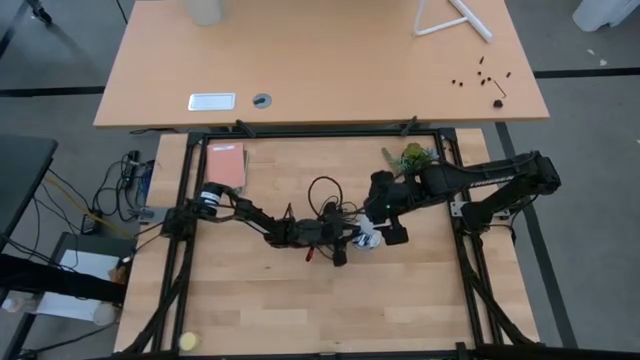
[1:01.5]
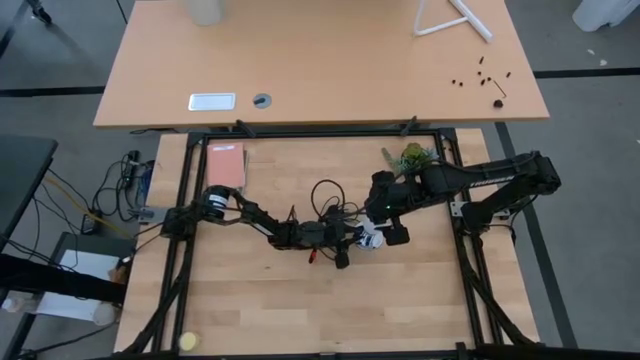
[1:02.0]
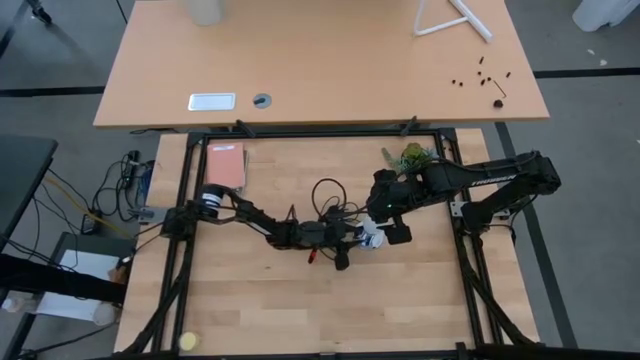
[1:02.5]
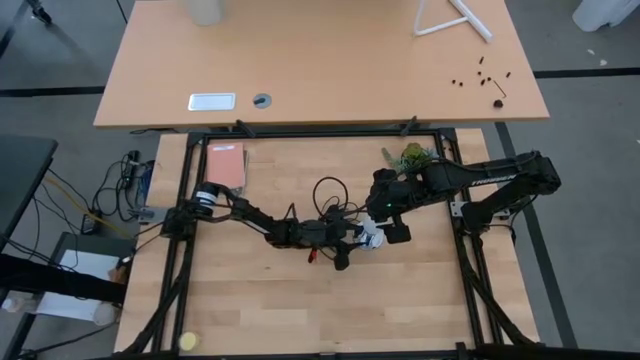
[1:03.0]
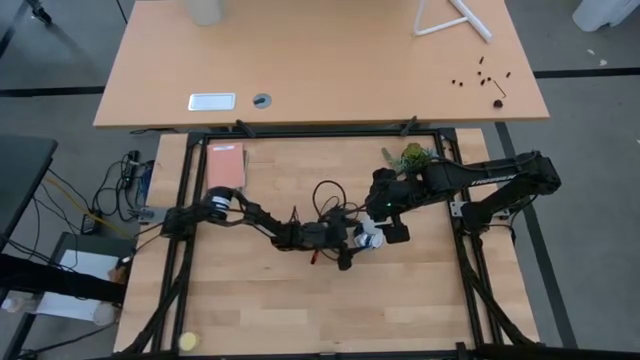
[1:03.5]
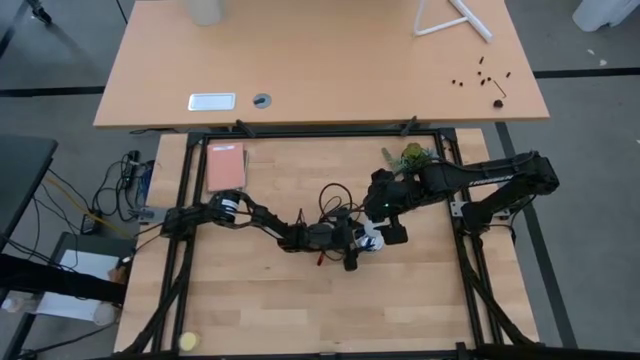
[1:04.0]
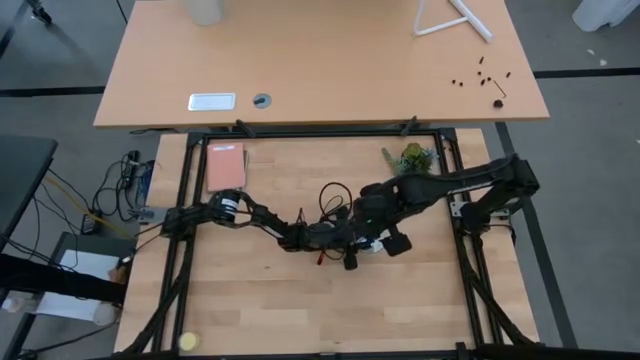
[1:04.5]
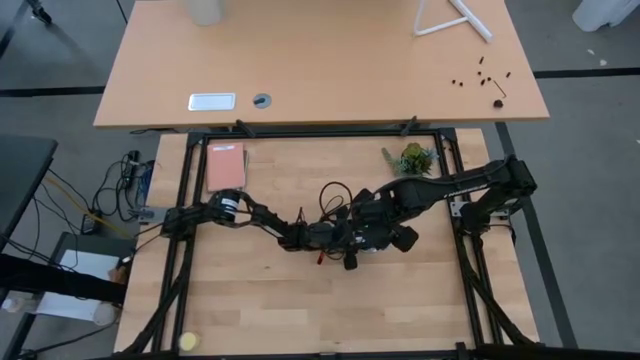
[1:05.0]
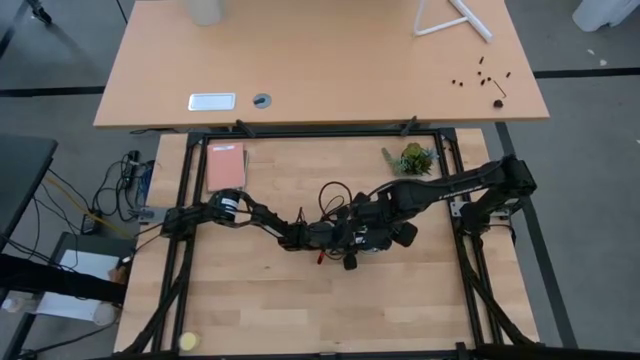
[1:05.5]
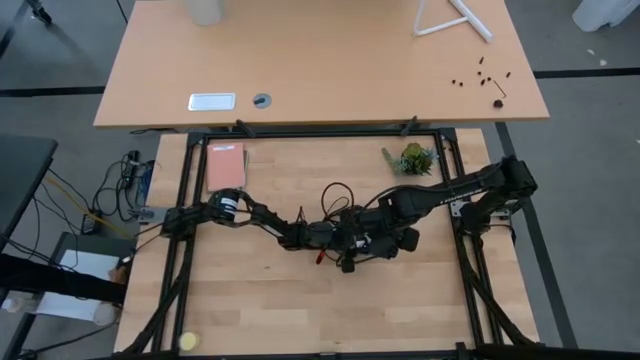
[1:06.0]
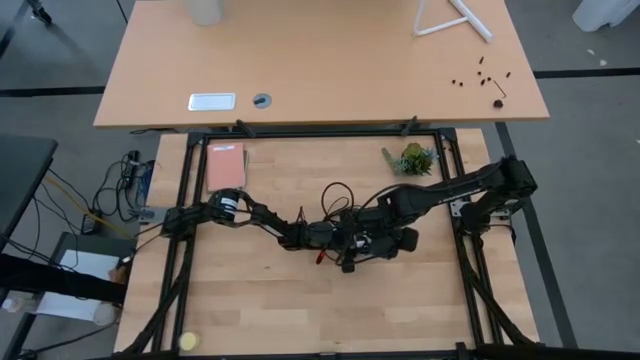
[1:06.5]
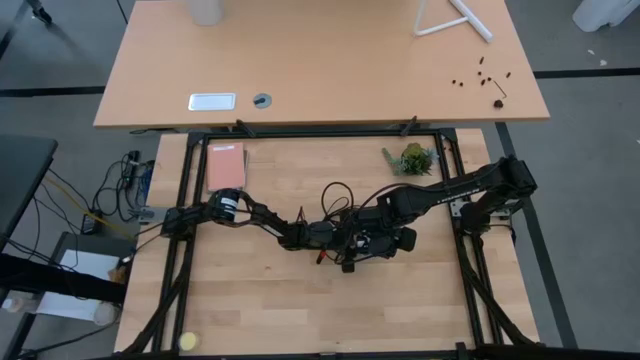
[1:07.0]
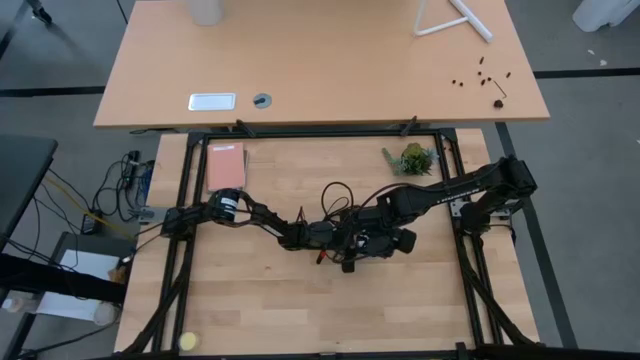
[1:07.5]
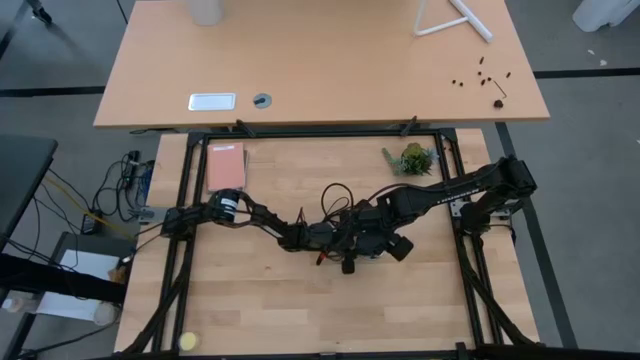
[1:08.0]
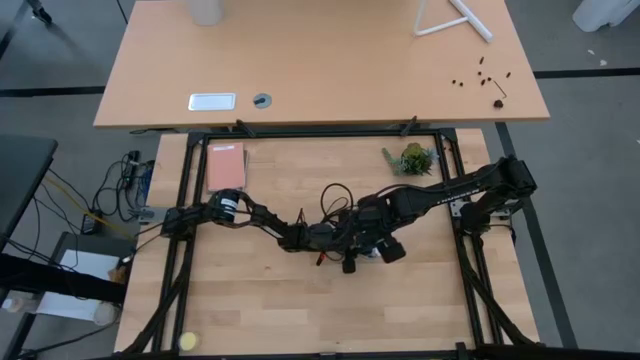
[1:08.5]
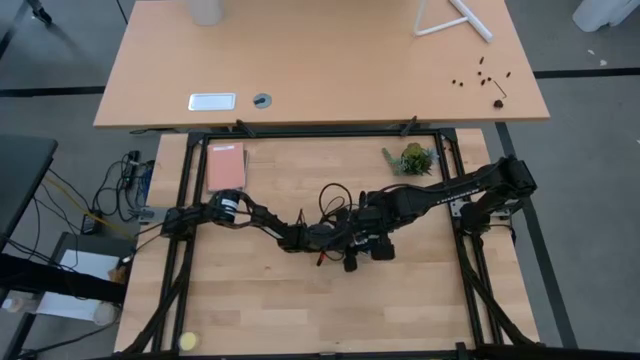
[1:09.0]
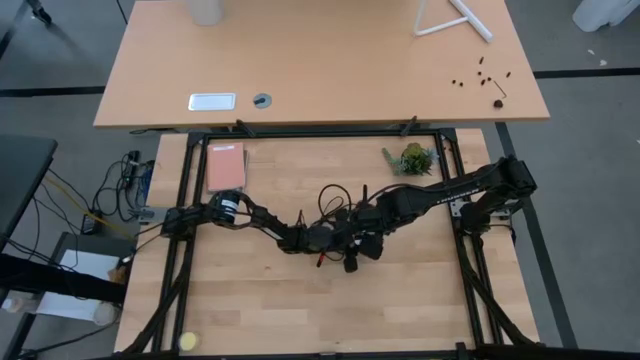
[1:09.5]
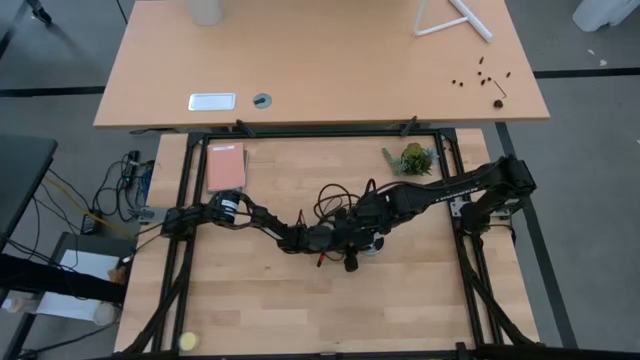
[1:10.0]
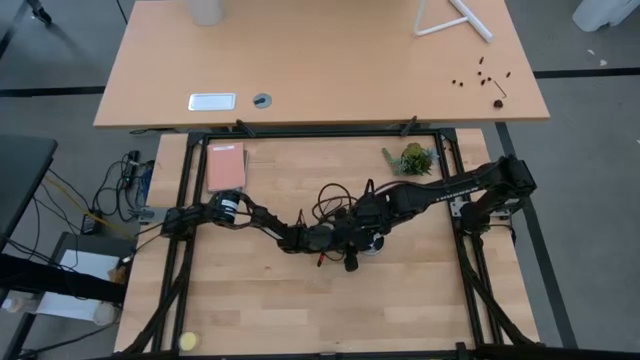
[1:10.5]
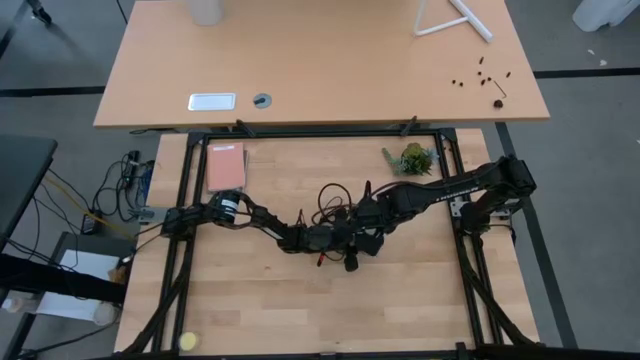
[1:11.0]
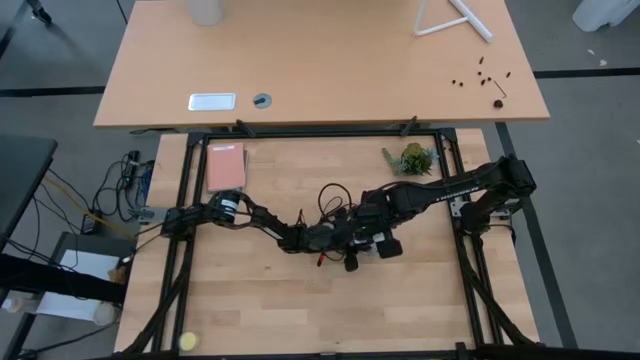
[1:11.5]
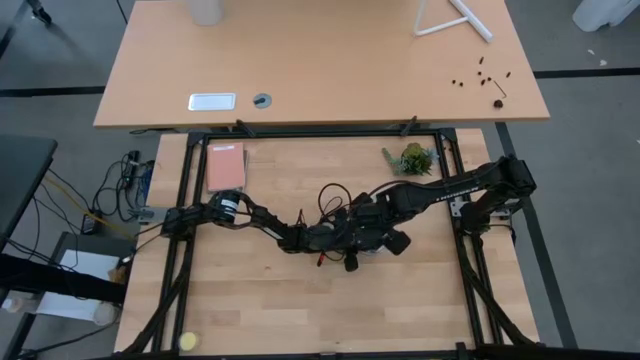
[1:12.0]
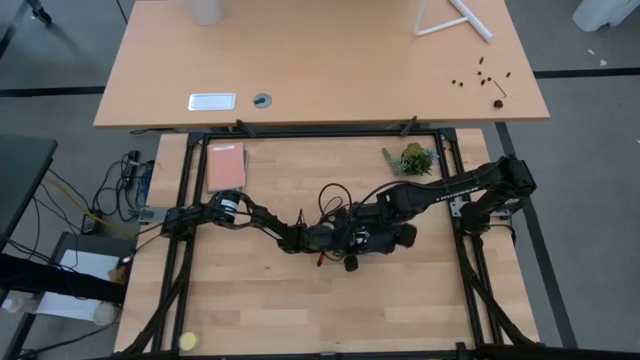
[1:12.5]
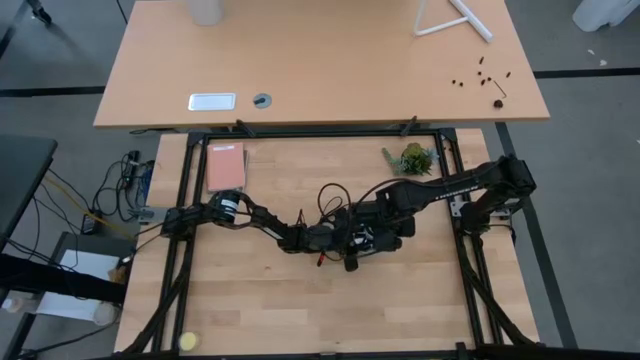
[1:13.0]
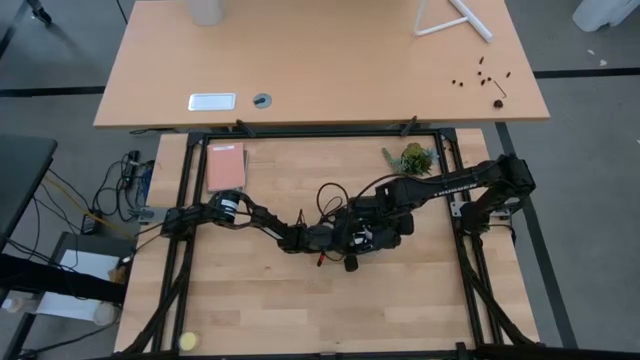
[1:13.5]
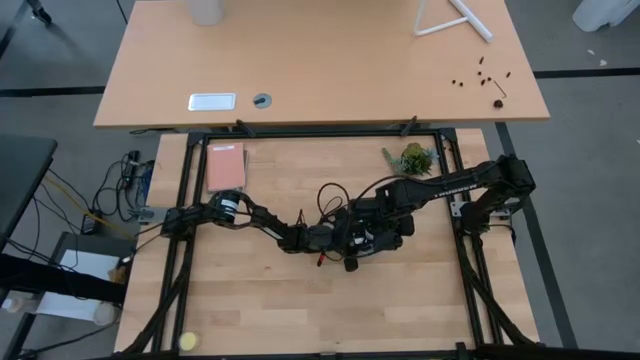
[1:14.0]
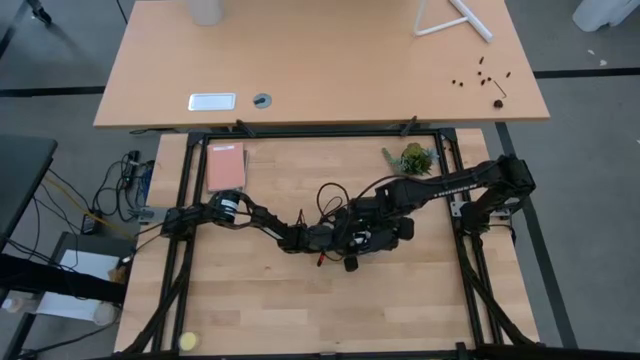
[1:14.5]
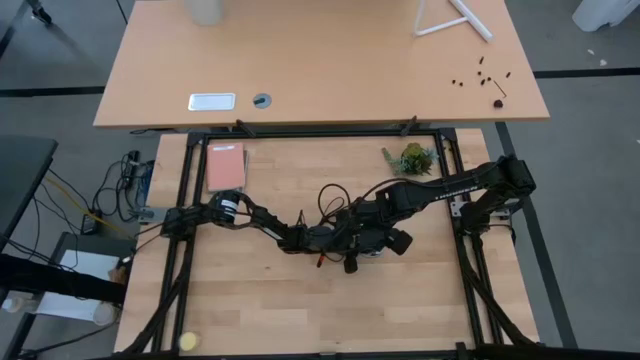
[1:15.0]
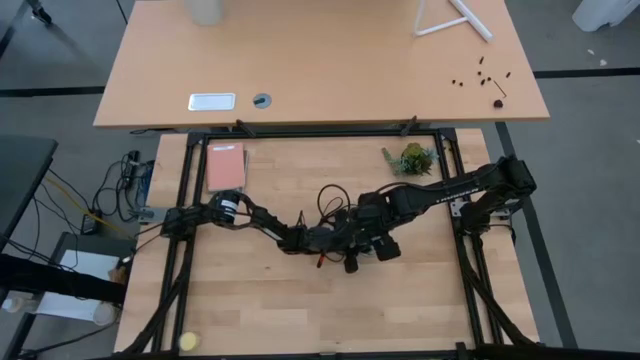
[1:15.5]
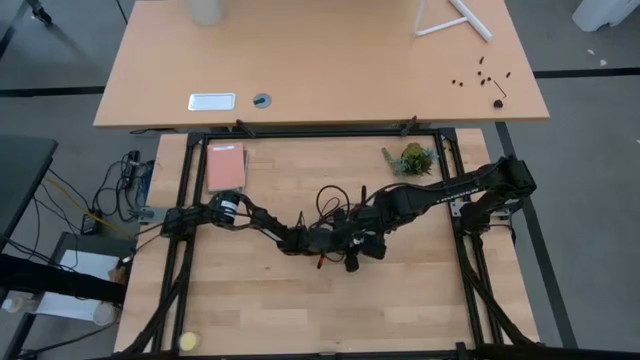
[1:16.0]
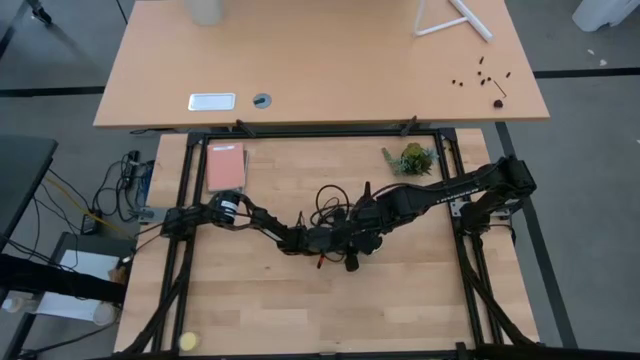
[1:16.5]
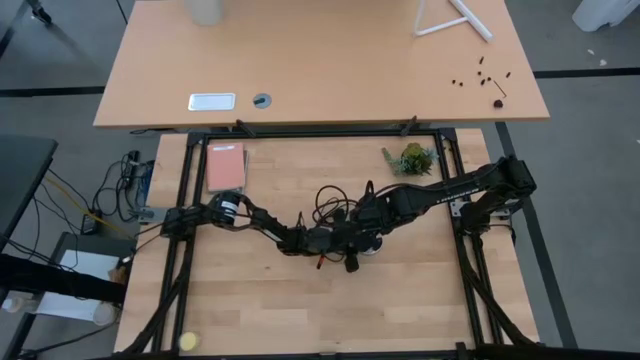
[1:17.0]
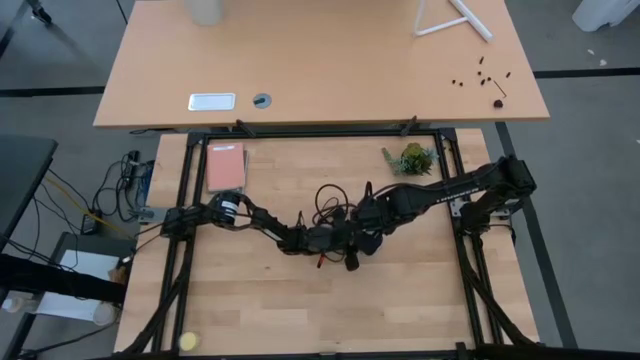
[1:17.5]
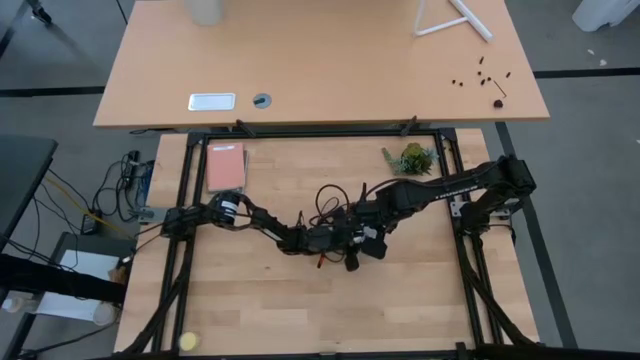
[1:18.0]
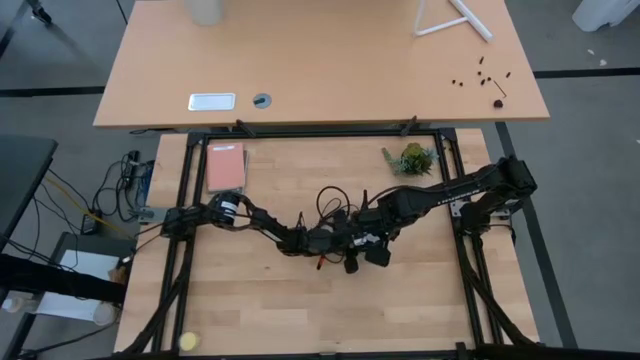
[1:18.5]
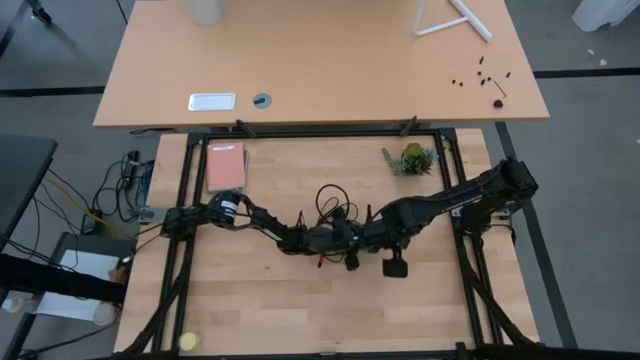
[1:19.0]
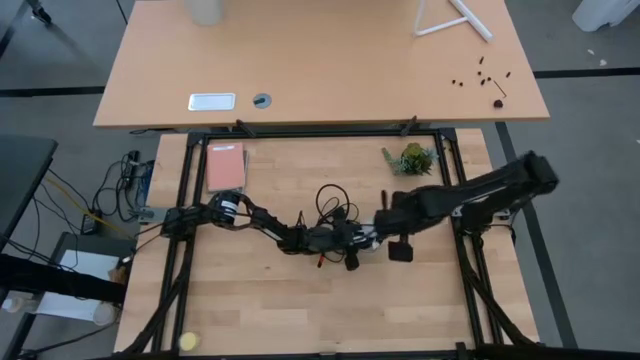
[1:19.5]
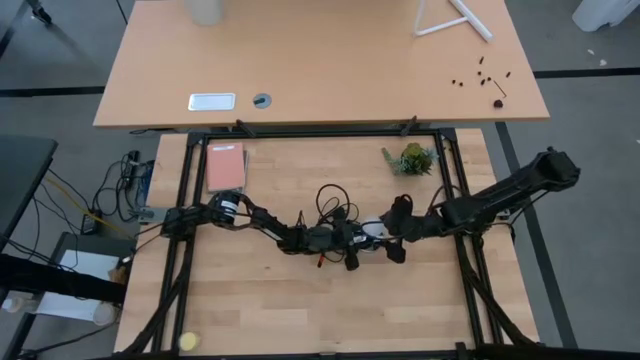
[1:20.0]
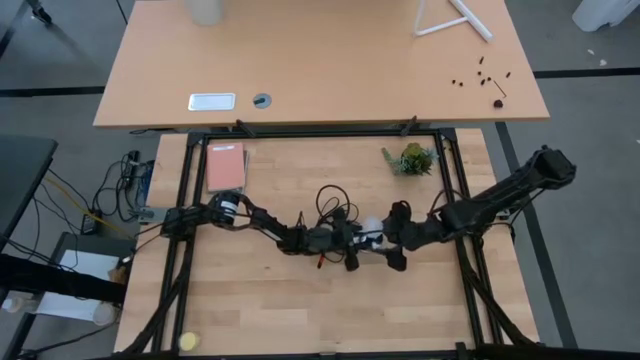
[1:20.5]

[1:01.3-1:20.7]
Task: Screw lightbulb
Insert the lightbulb into the lamp
